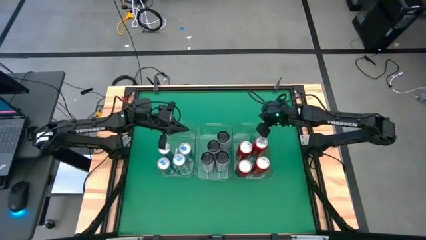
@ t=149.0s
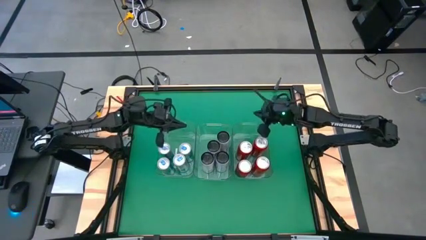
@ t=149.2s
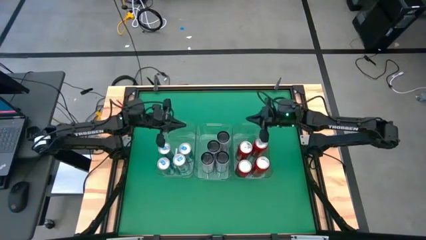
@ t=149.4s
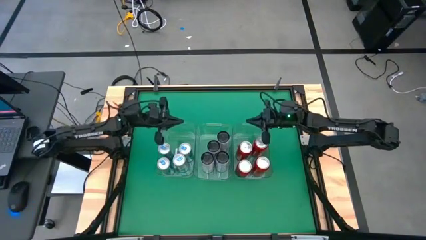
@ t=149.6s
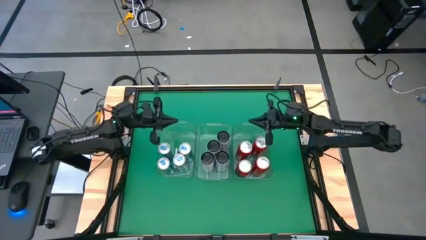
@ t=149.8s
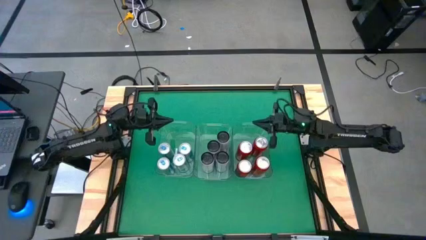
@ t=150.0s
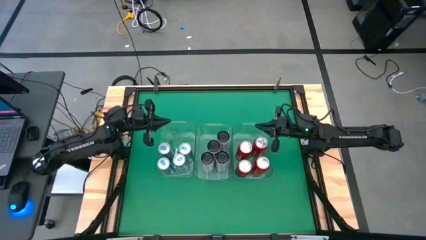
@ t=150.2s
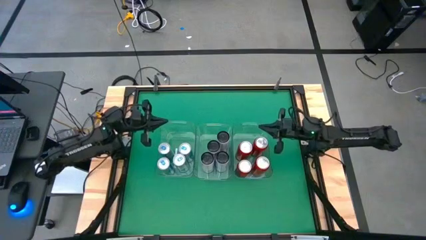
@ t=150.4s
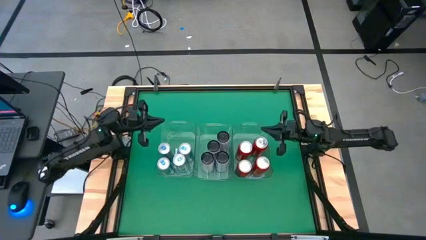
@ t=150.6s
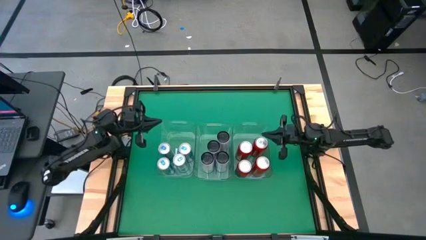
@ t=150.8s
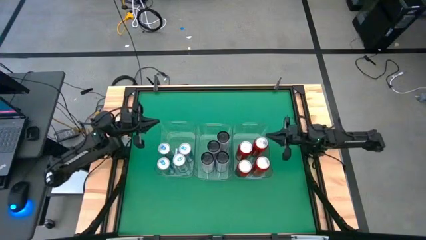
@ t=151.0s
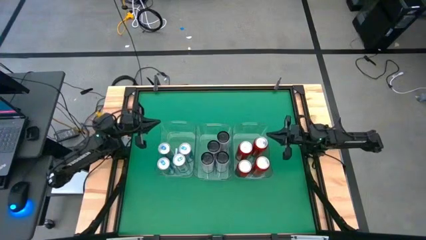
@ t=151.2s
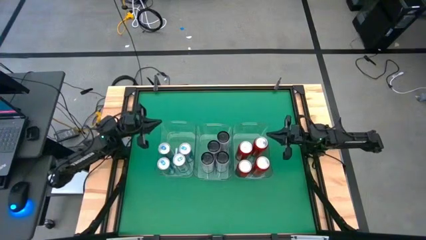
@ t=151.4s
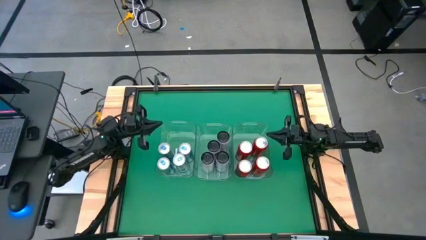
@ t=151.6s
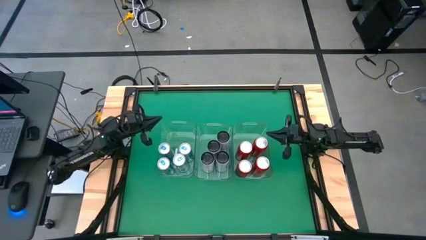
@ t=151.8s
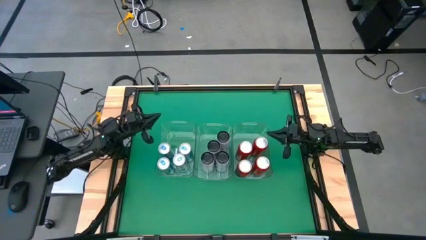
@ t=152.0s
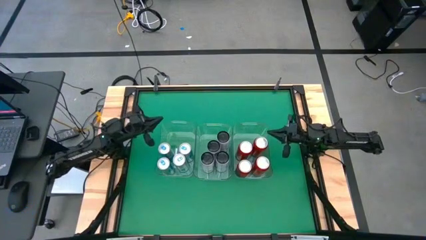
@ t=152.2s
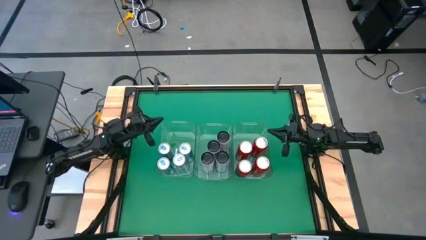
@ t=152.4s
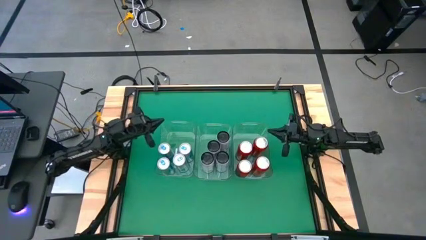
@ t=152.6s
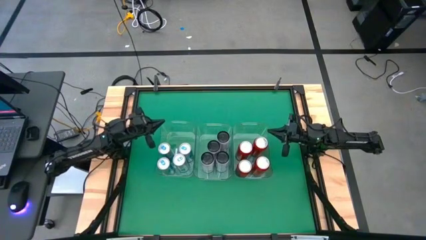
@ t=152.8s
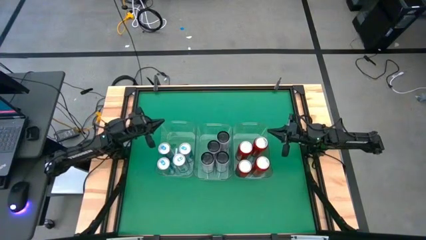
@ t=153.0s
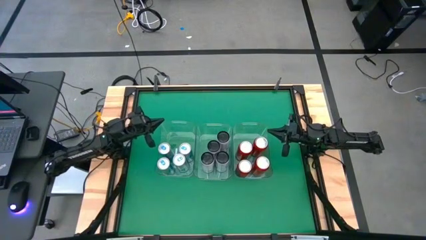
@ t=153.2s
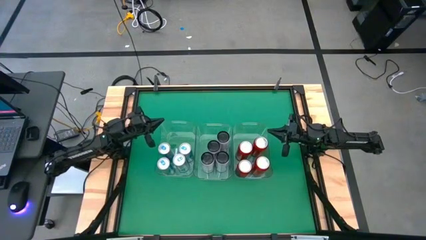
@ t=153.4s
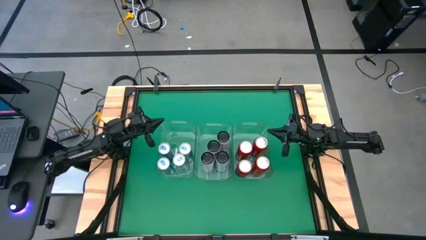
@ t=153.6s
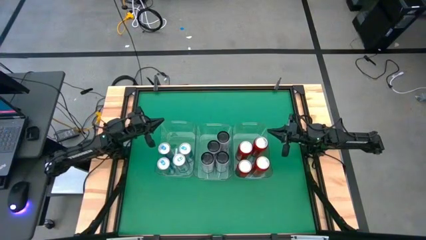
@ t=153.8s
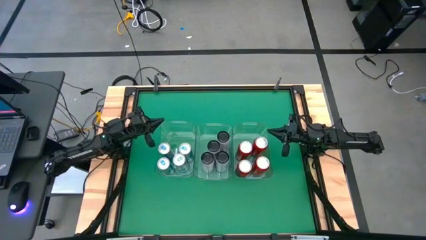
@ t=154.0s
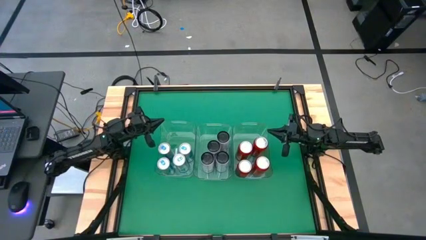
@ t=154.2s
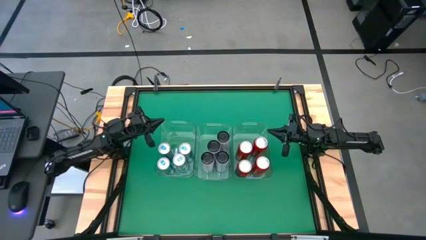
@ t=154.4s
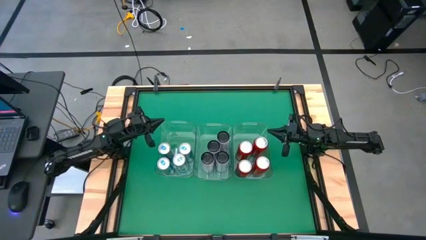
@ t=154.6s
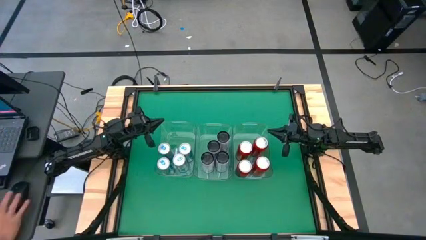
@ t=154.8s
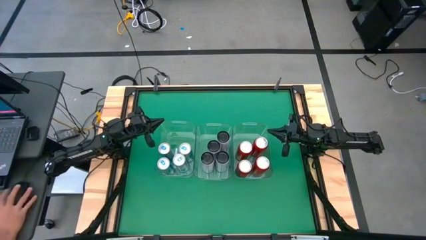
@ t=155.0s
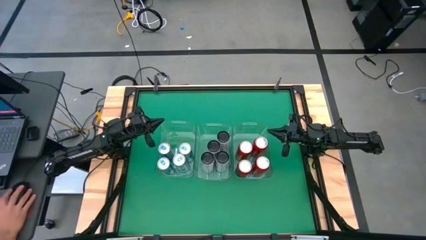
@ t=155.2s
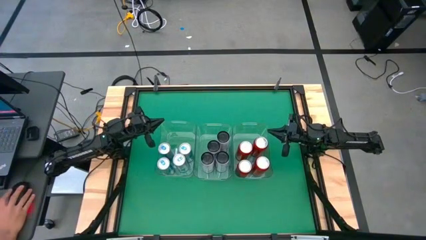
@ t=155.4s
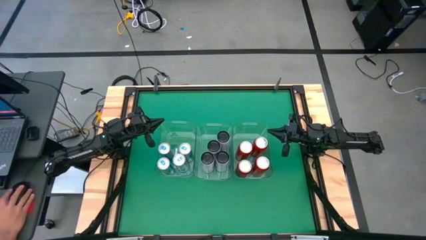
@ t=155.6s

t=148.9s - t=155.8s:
Task: Sort soda cans
Return to Home Position
